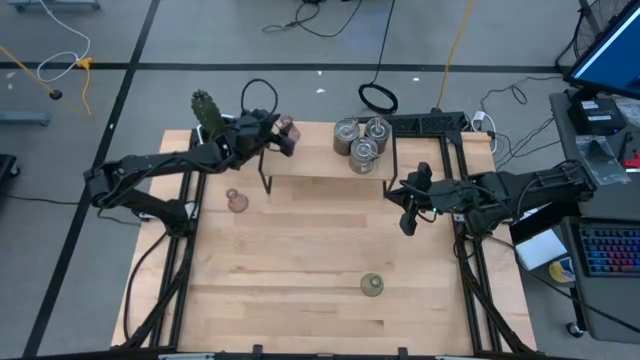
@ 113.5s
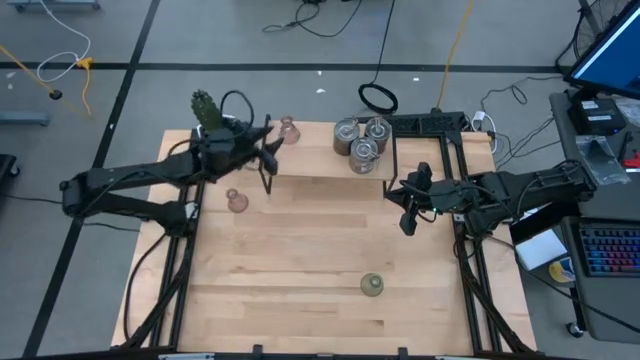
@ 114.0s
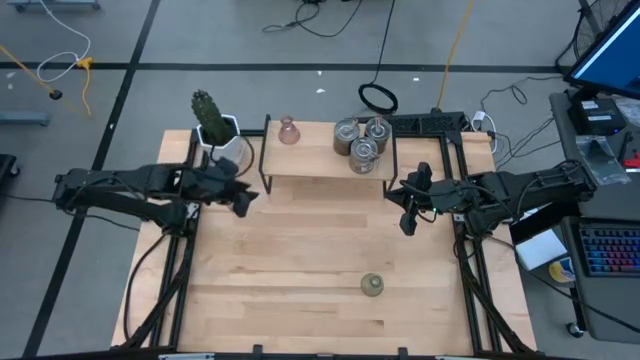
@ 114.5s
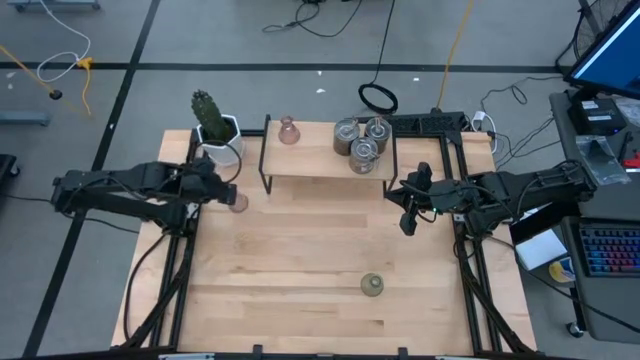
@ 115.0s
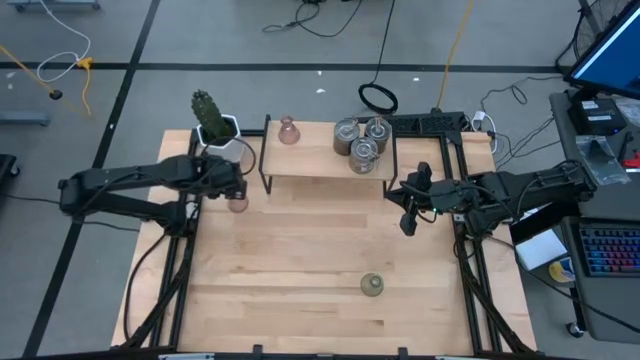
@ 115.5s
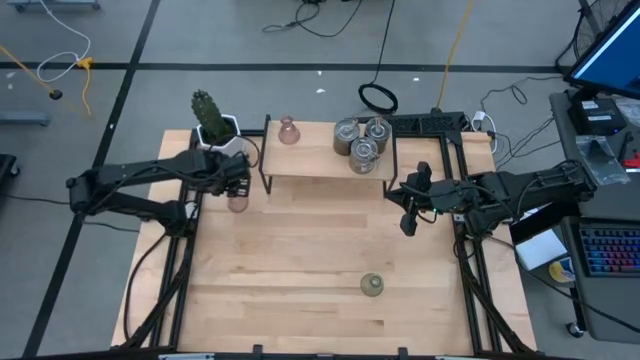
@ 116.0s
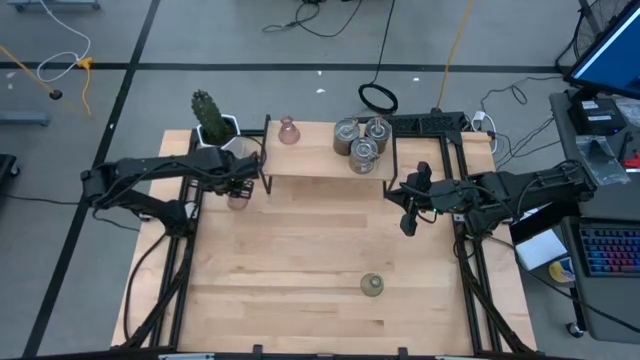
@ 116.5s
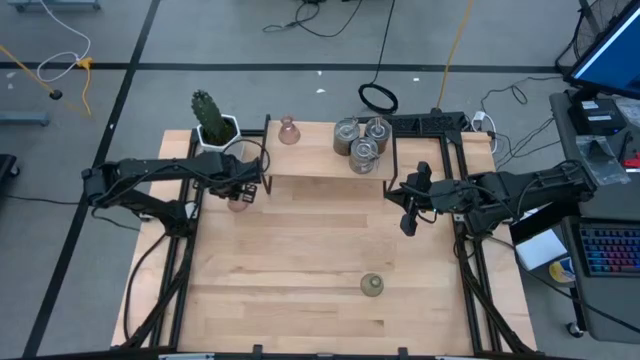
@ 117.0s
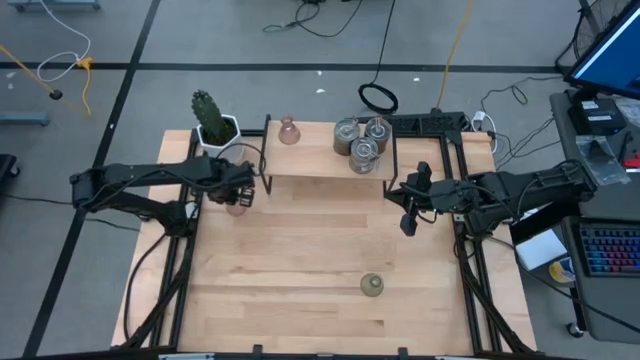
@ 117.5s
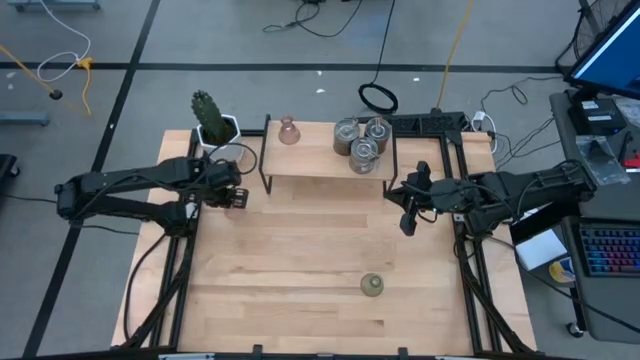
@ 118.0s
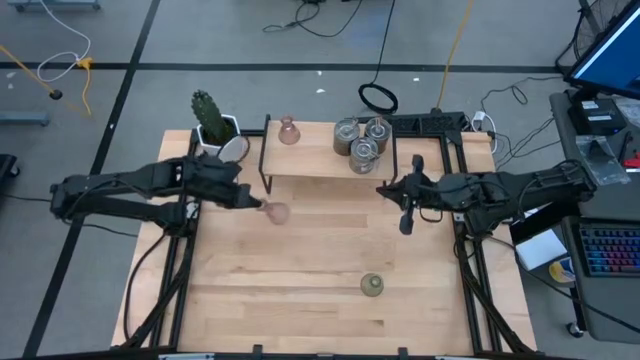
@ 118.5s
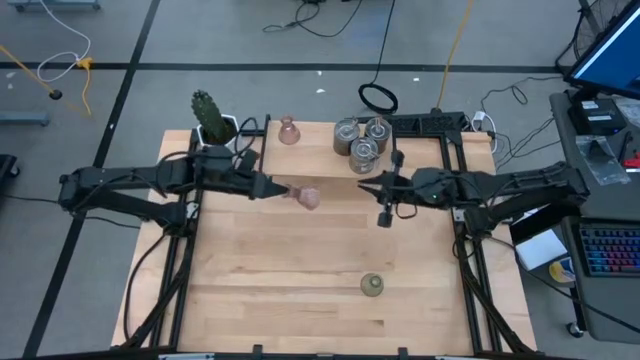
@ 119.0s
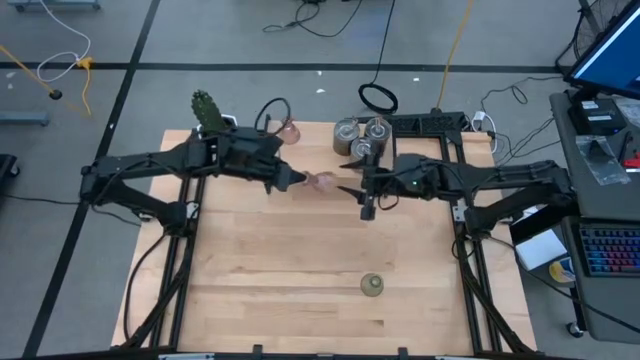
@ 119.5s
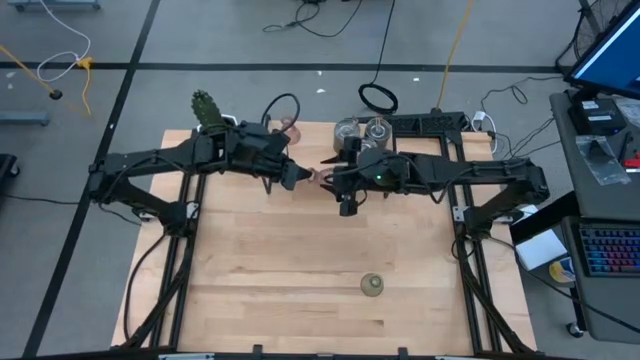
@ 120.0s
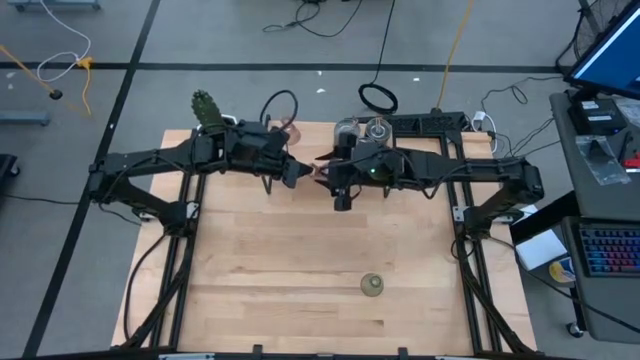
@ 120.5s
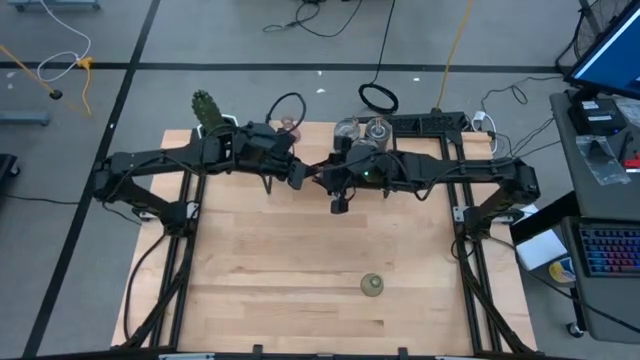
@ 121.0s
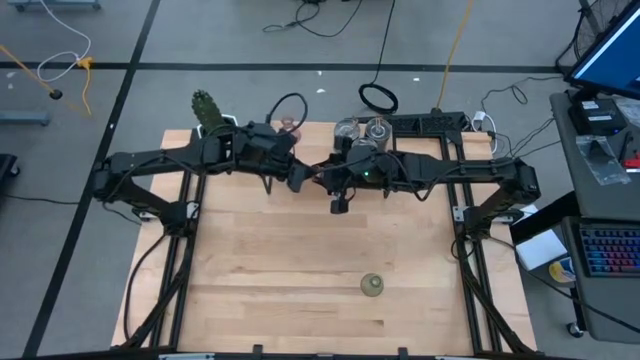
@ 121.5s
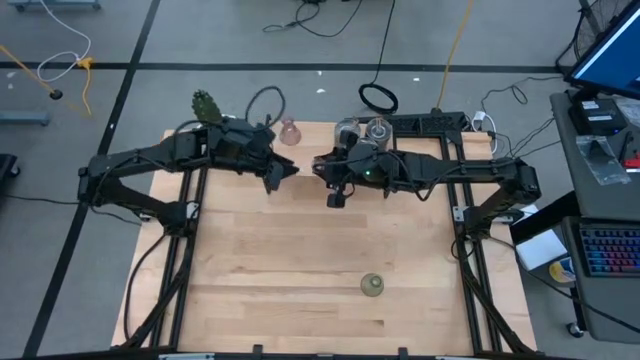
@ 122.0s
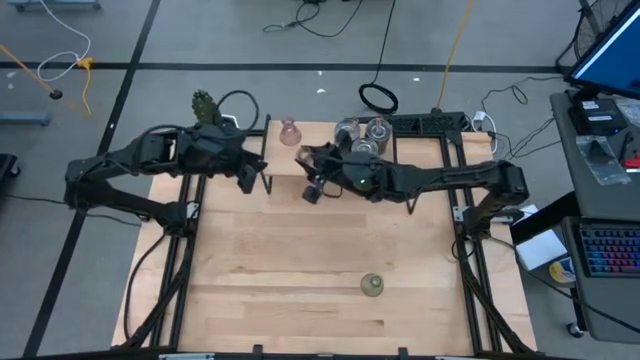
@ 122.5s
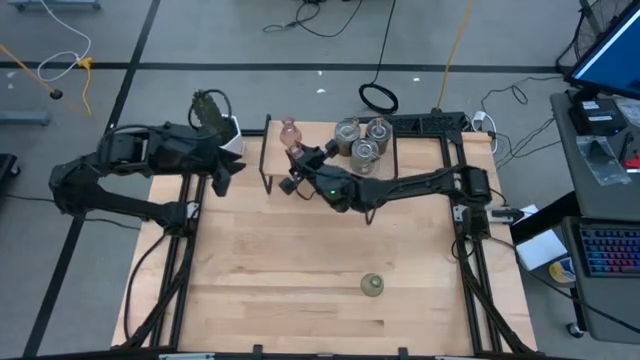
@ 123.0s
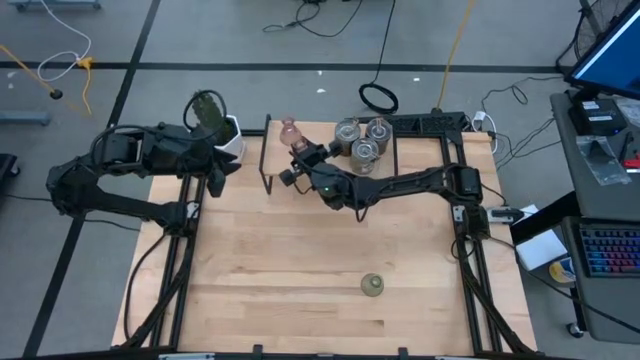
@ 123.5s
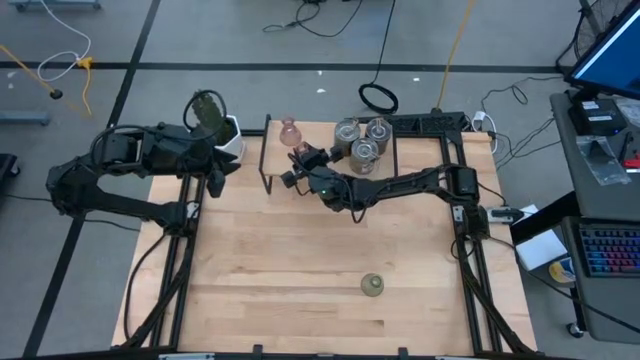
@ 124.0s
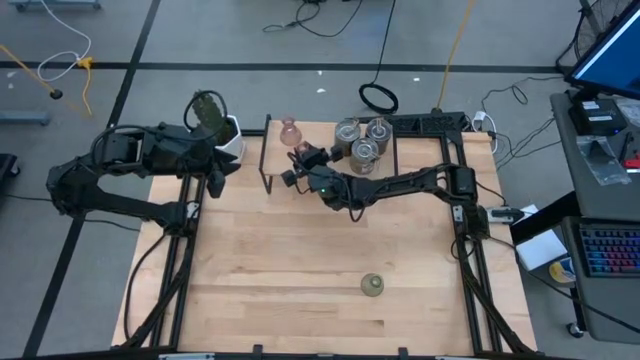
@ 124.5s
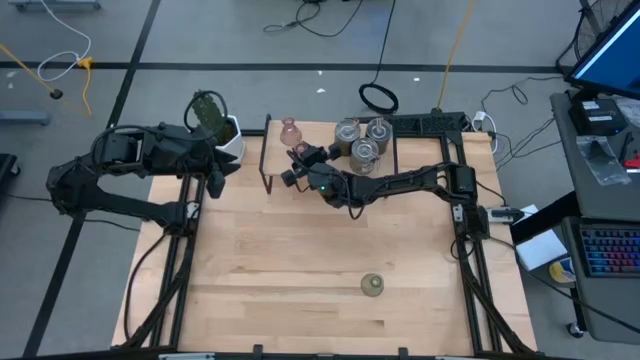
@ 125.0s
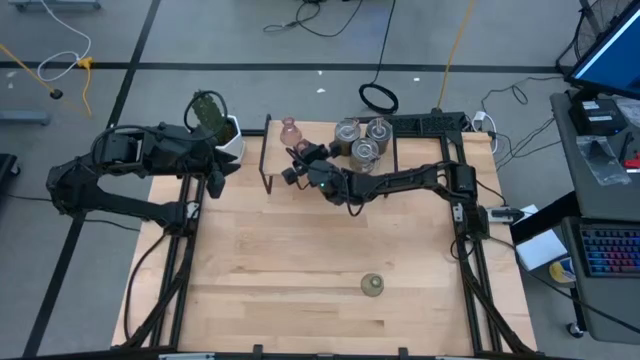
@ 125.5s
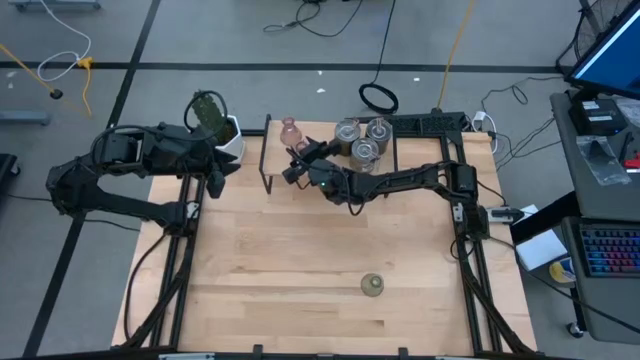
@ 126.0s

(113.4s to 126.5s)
Task: Pick & Place candle stick holders
Put the purple glass candle holder on the shelf

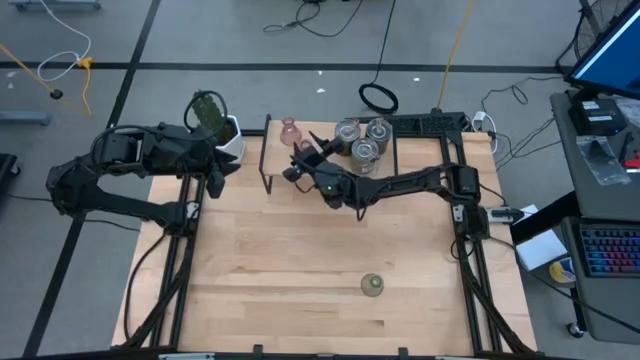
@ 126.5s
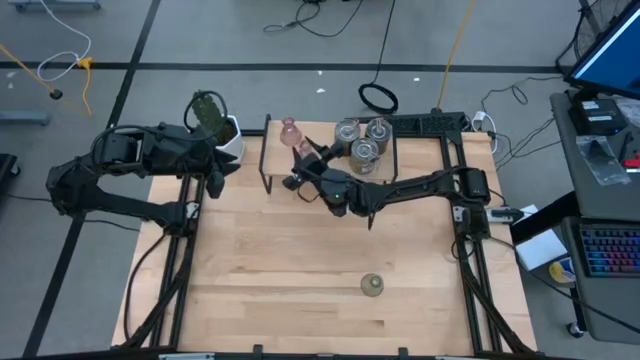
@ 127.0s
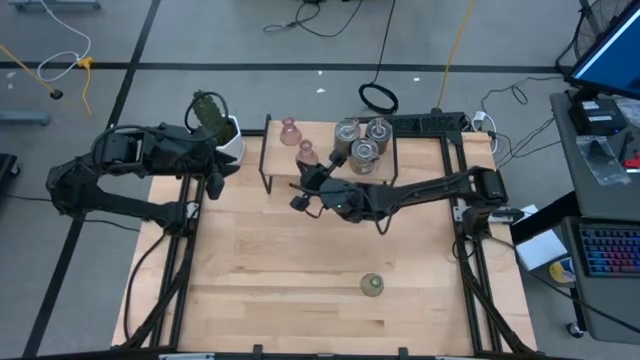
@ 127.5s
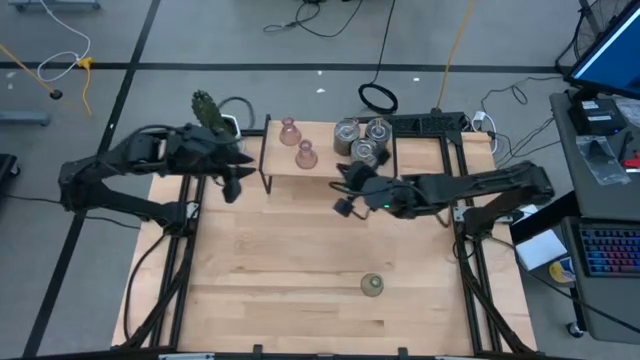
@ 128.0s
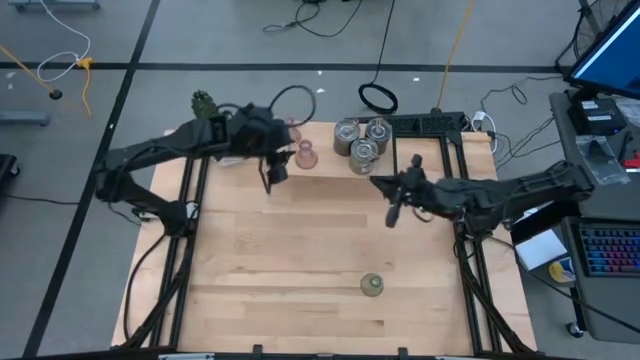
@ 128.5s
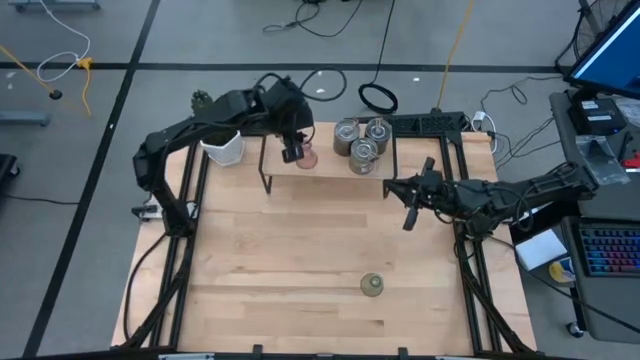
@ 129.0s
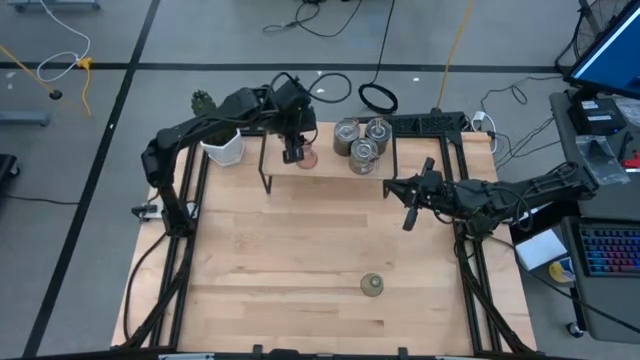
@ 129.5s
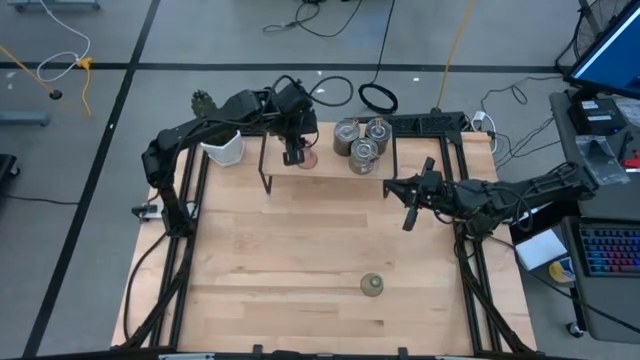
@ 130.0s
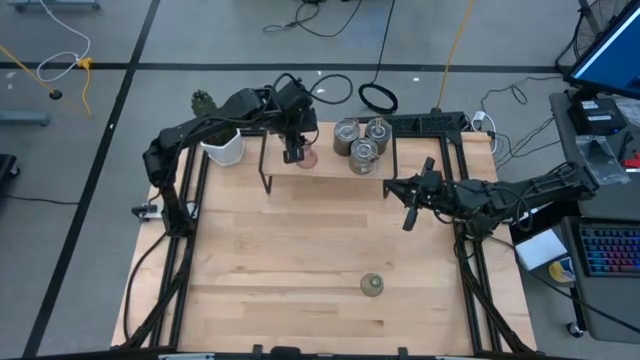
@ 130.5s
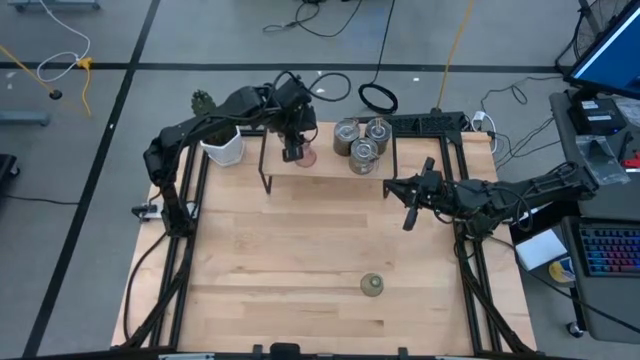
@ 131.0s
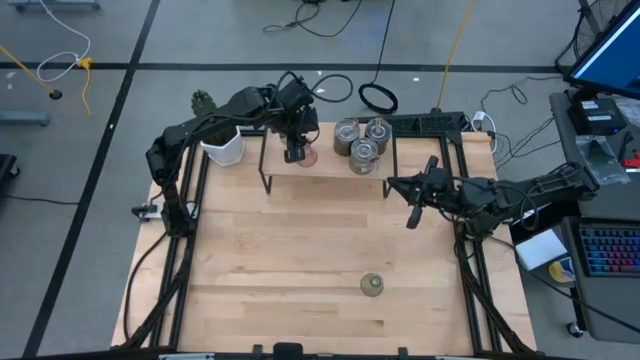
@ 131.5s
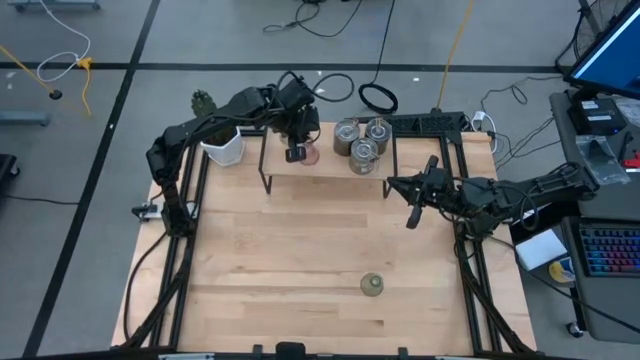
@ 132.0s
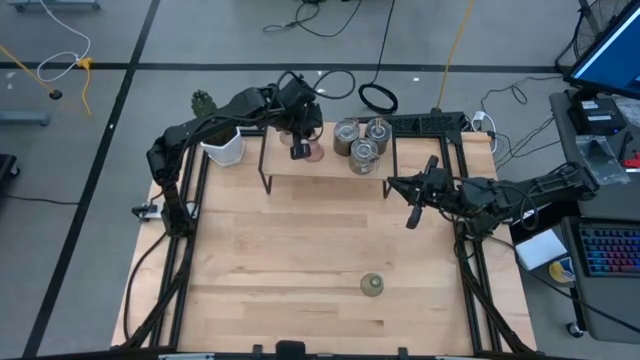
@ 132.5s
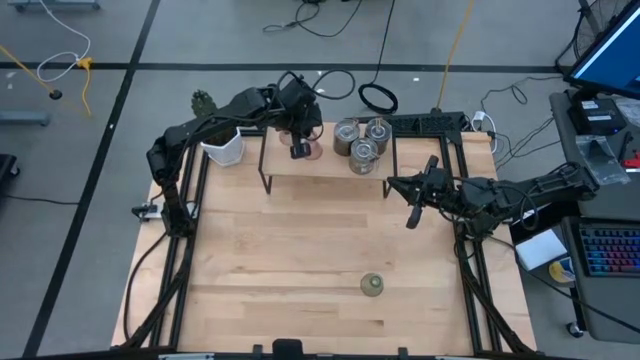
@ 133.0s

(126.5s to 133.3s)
Put the purple glass candle holder on the shelf

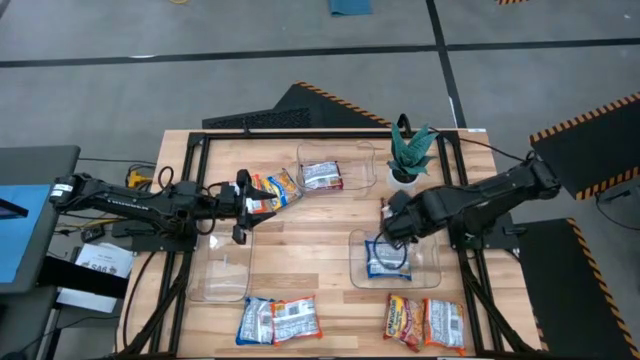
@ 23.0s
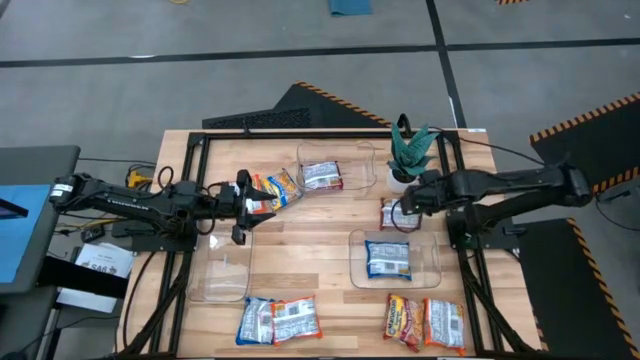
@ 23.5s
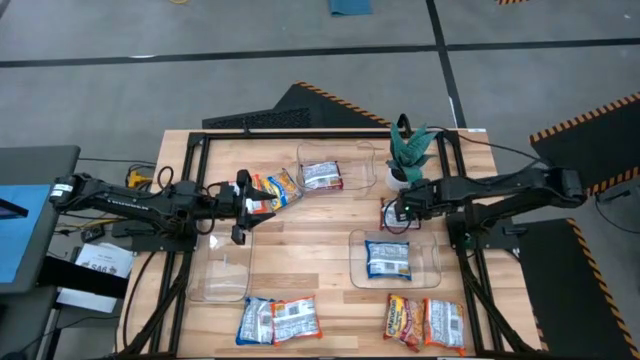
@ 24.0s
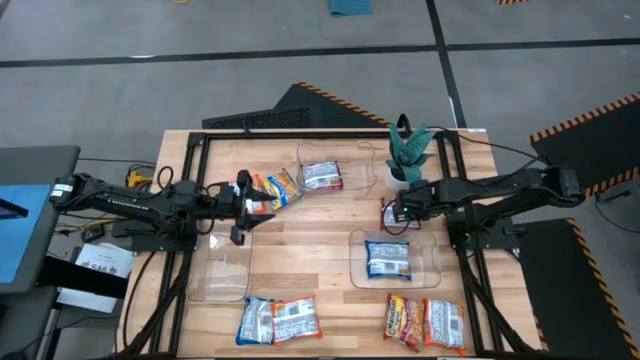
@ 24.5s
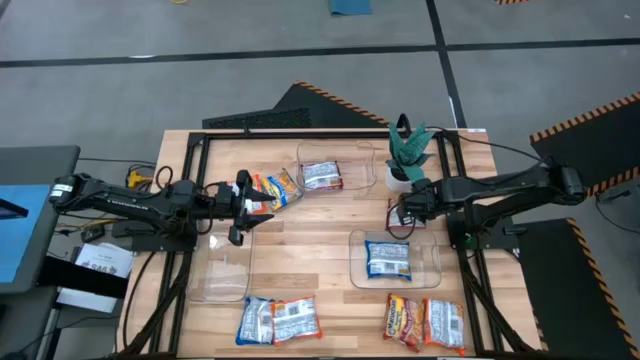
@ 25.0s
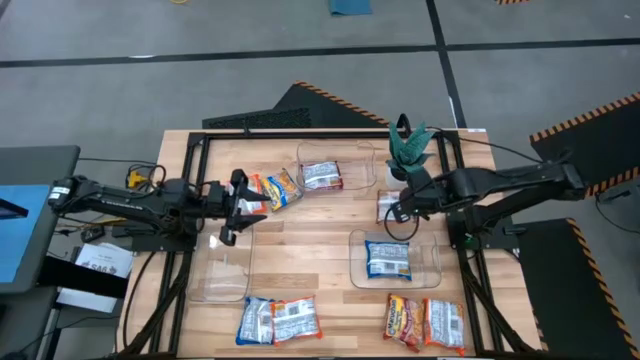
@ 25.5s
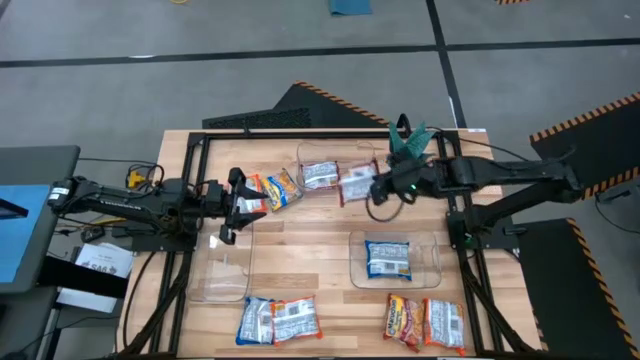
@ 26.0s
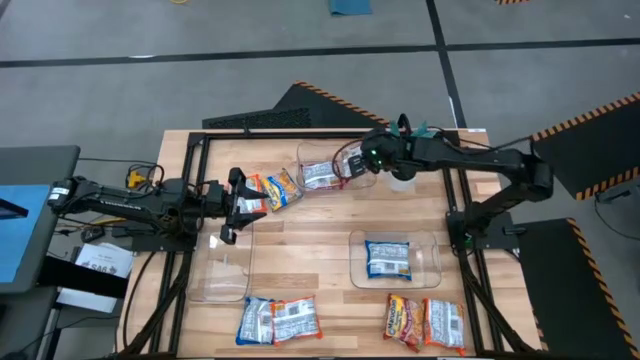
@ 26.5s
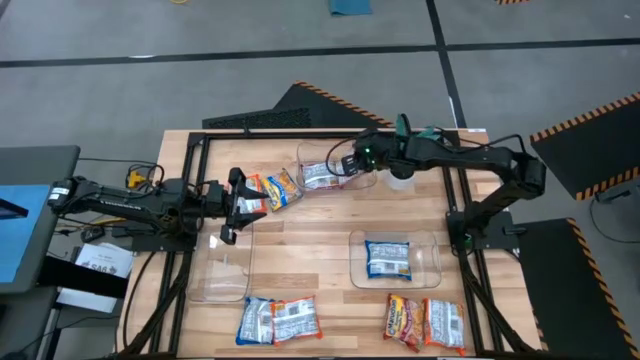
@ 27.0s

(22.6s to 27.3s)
Task: Sort Maruchan noodles
Put the top red bag into the top transparent bin
